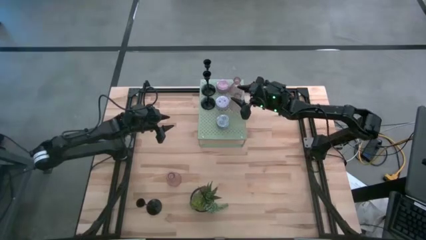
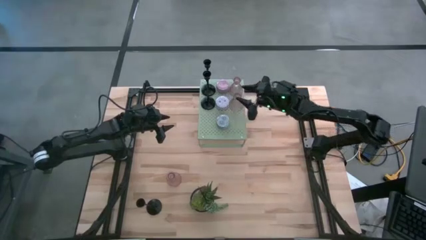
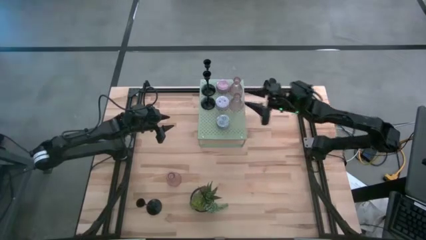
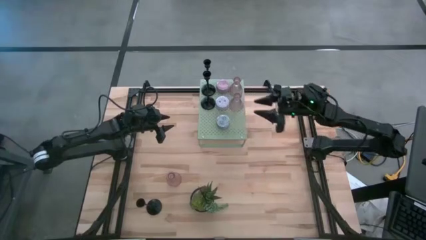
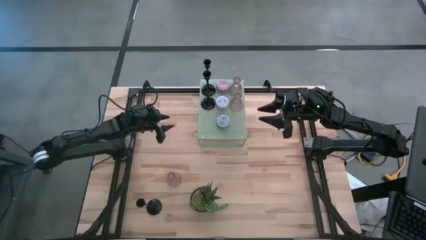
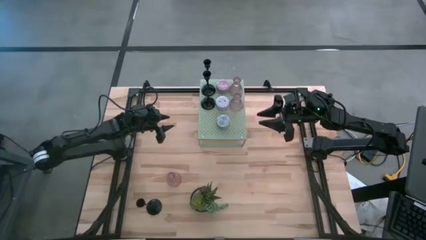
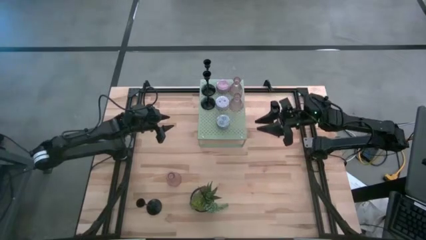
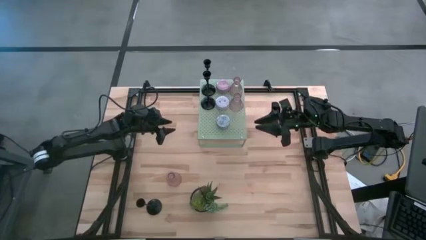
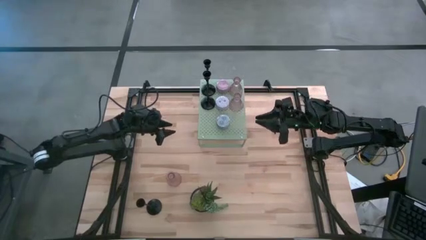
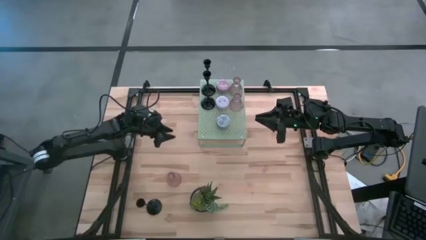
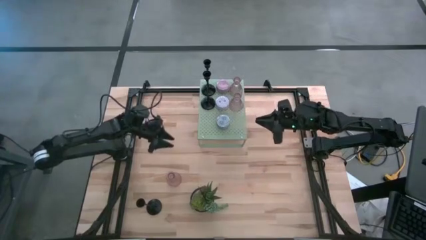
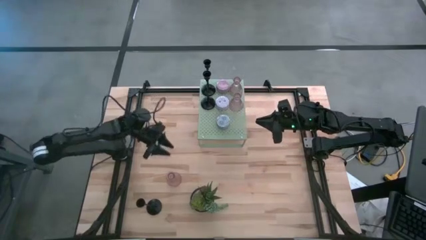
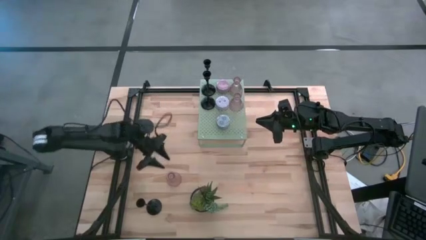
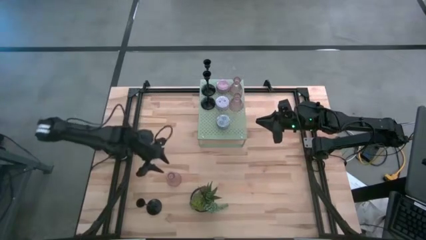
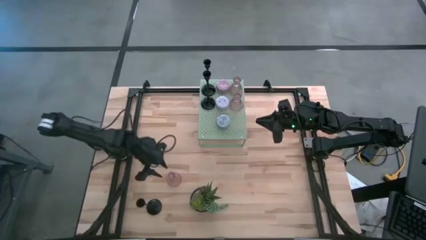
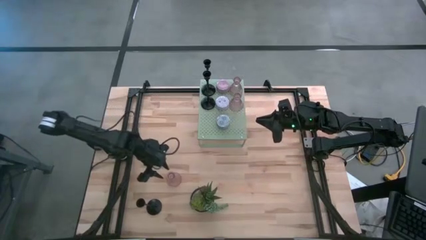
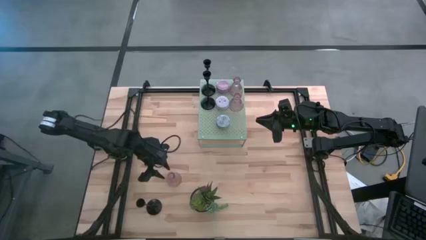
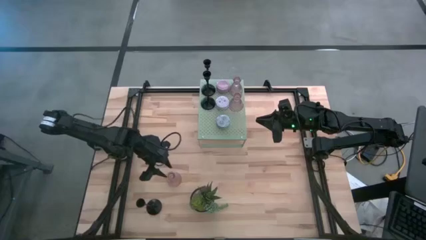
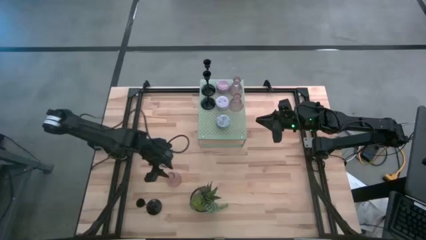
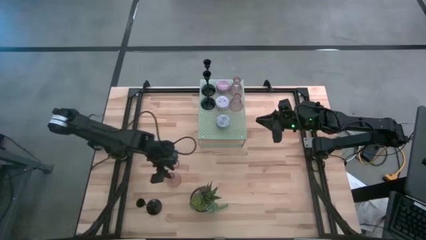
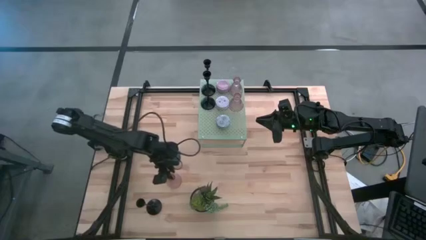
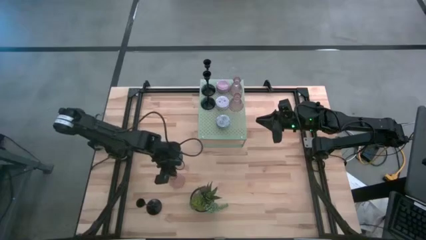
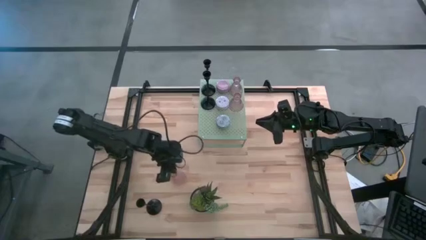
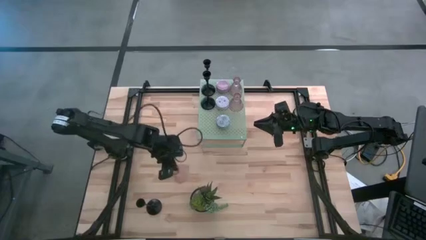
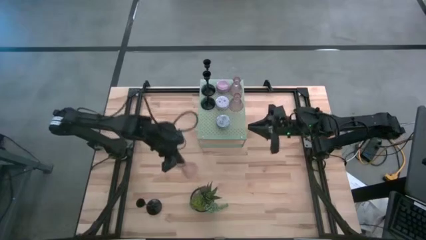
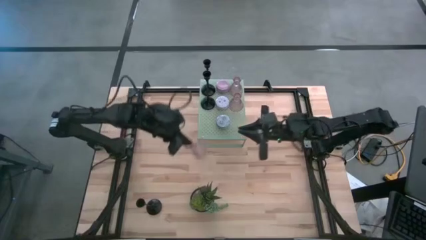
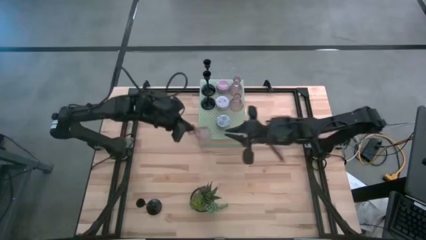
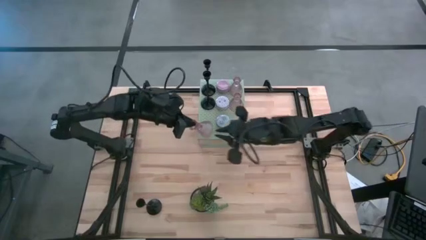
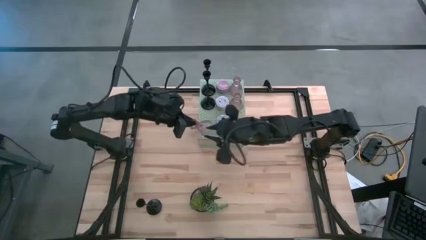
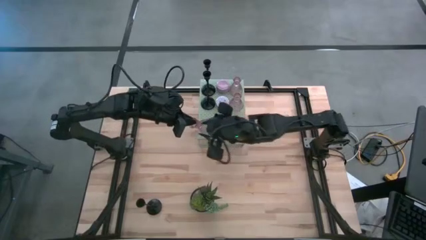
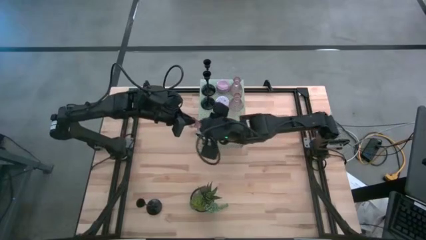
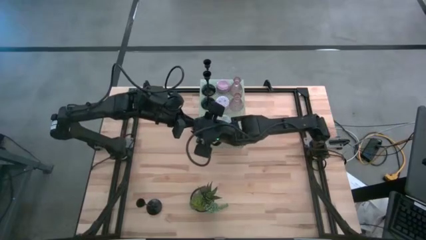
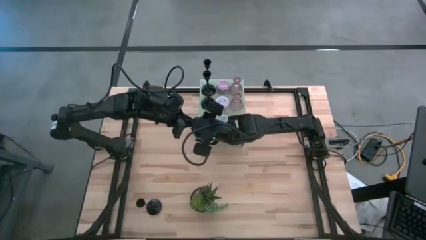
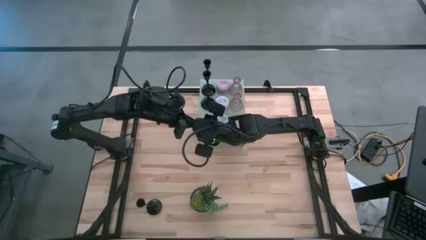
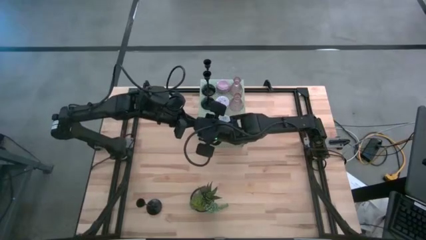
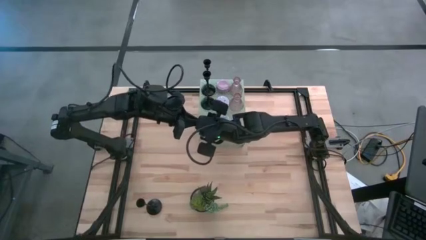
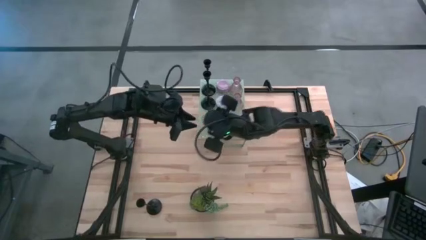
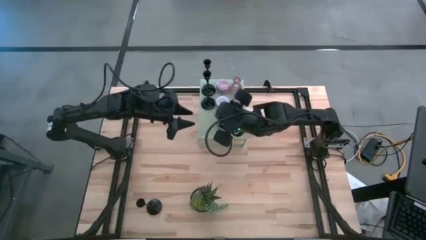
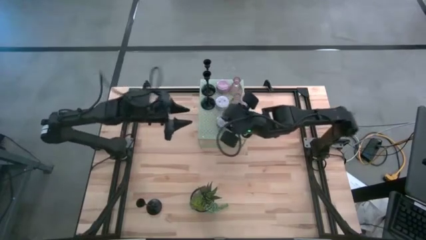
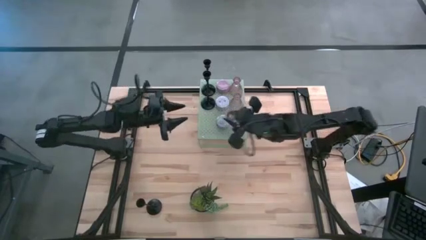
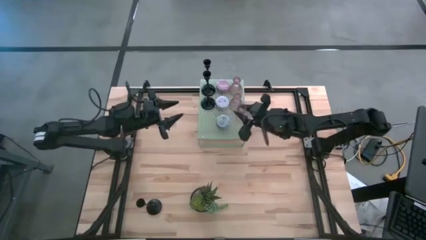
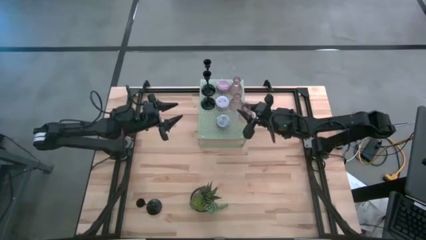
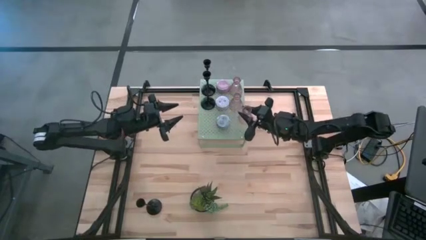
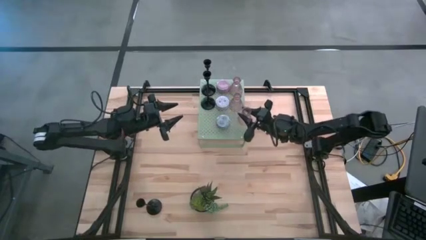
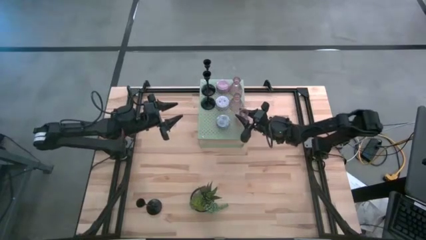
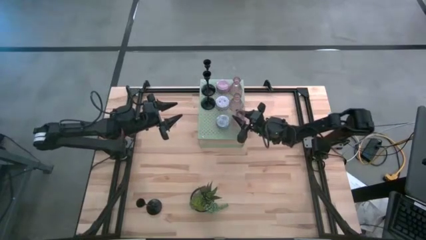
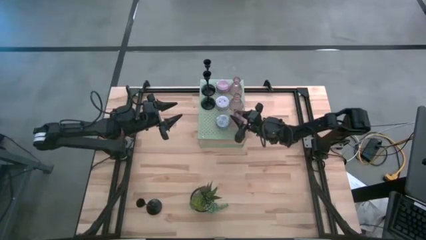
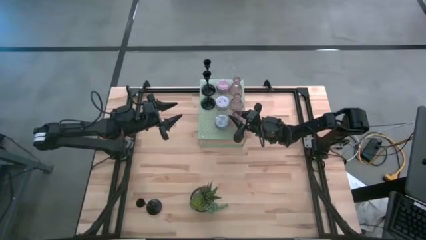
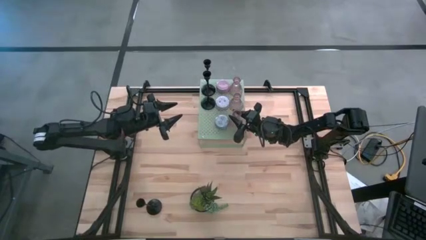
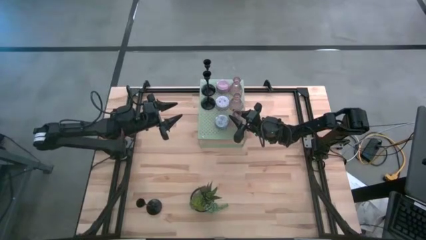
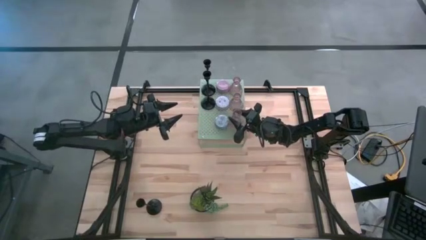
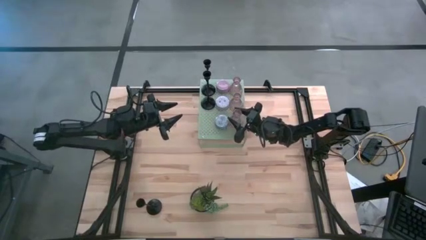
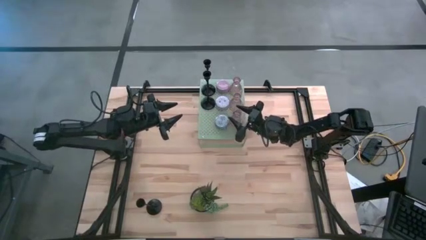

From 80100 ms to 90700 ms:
Task: Pick & Place candle stick holders
Put the pink glass candle holder on the shelf aligned with the other pink glass candle holders

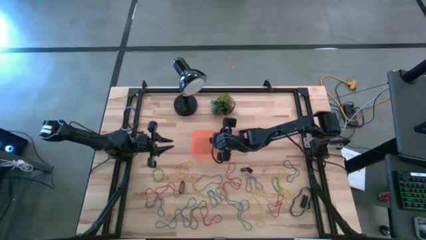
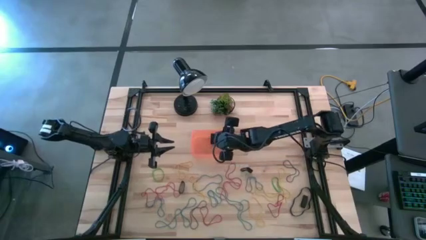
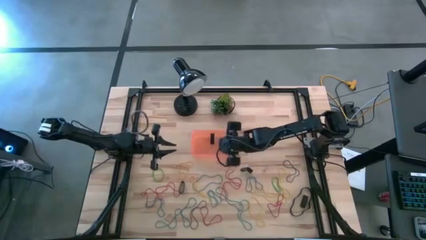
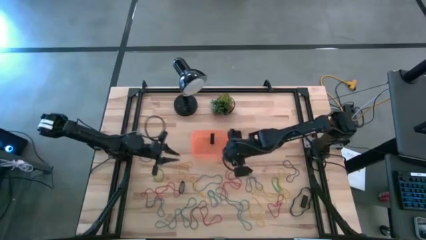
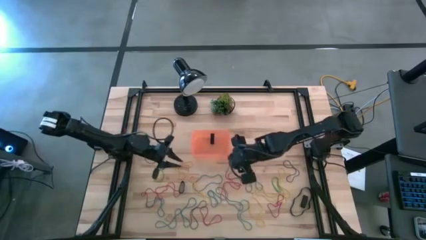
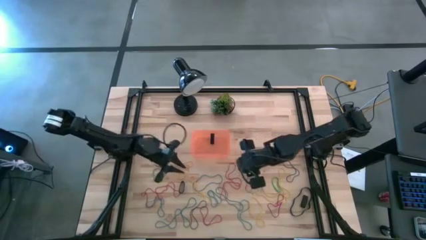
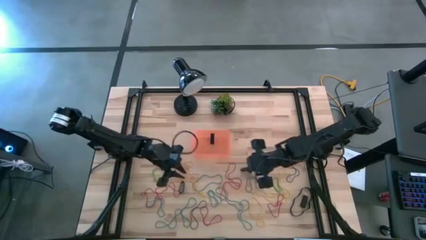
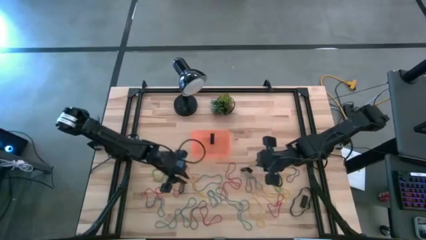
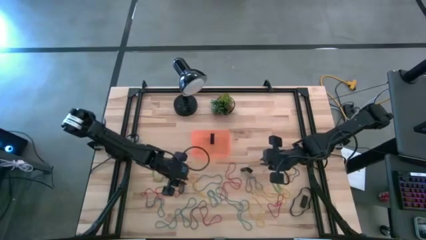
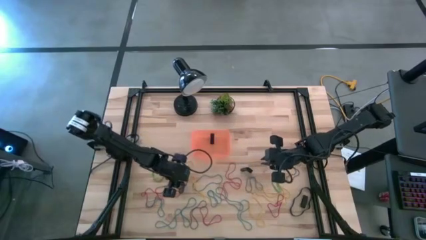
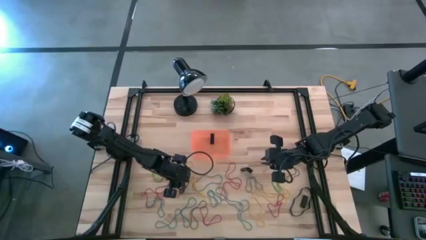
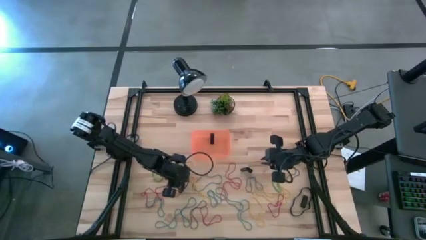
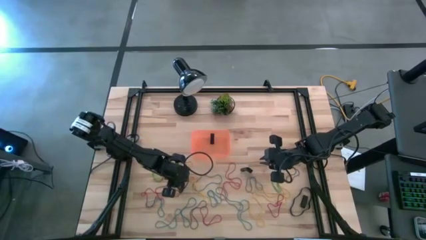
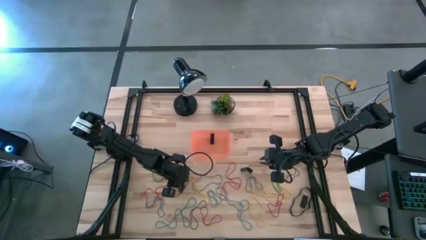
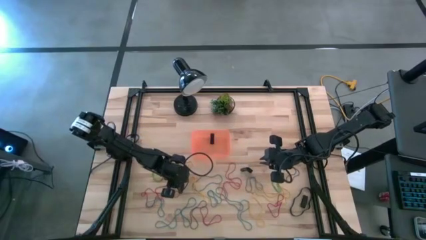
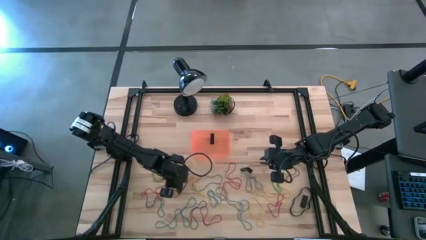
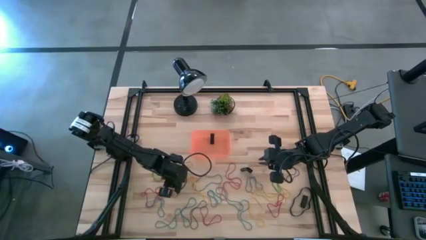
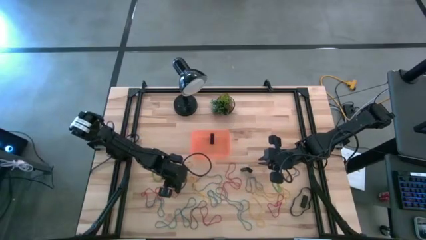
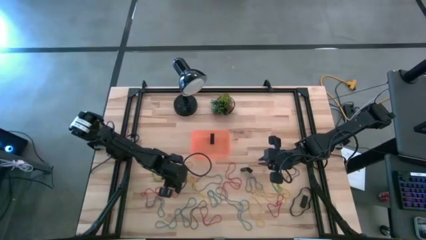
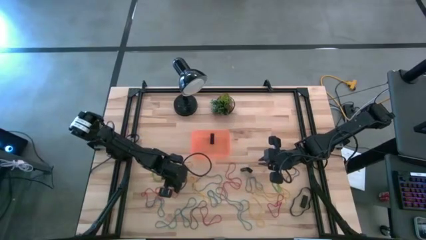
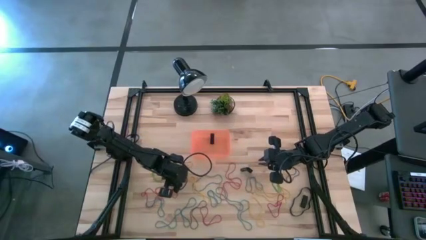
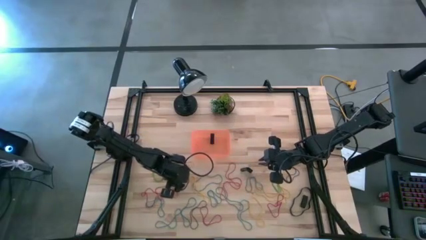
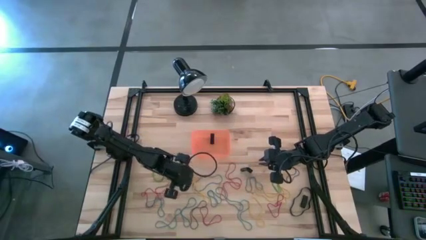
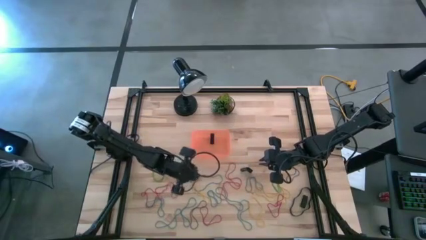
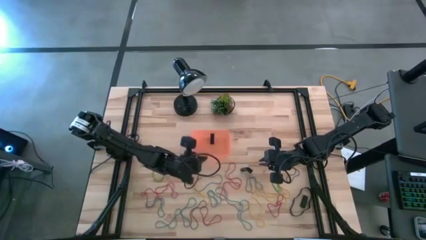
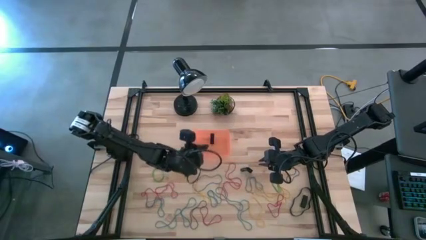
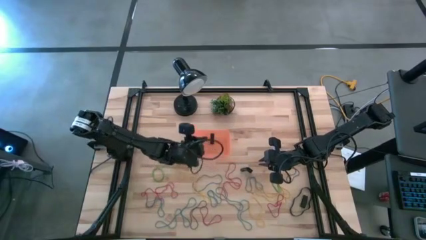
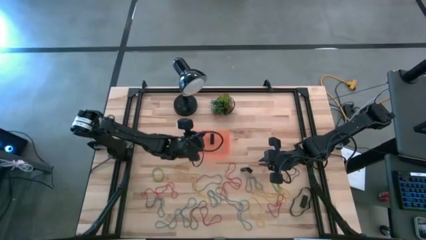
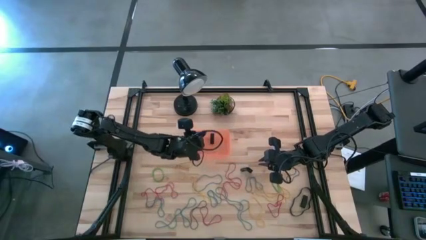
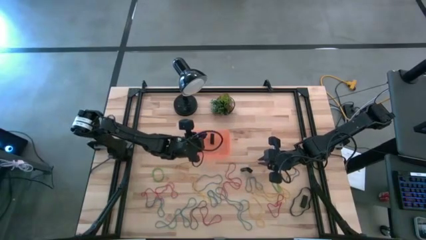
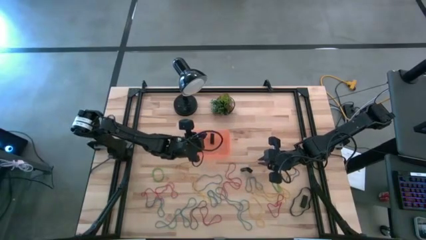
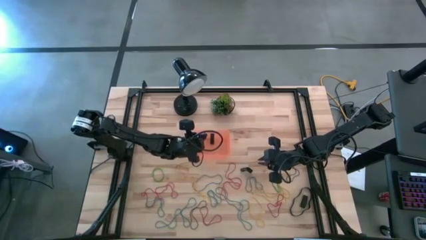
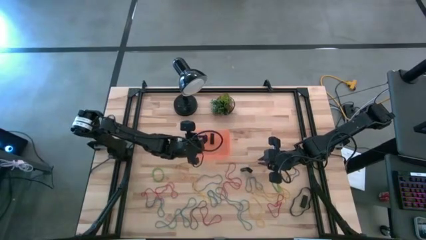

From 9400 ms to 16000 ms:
Task: Pick and place rubber bands into bin
Put the black rubberband into the orange bin
